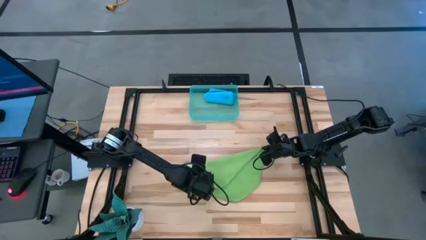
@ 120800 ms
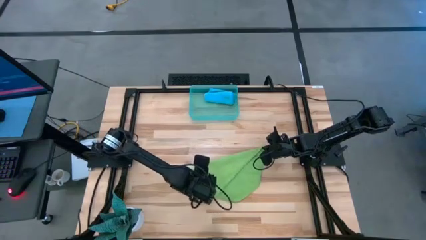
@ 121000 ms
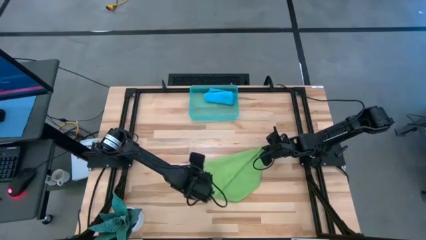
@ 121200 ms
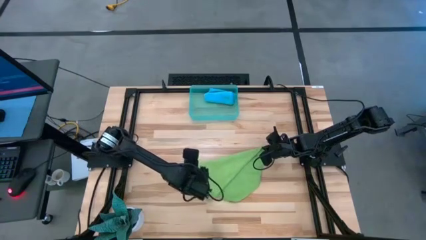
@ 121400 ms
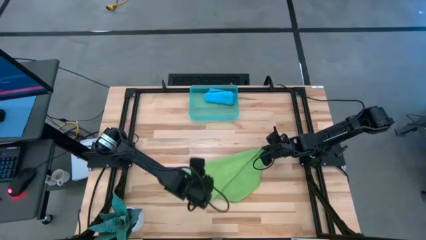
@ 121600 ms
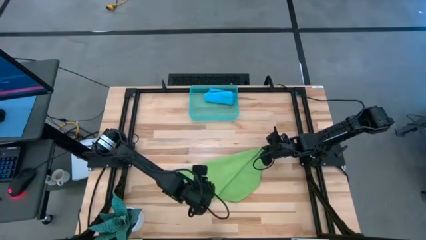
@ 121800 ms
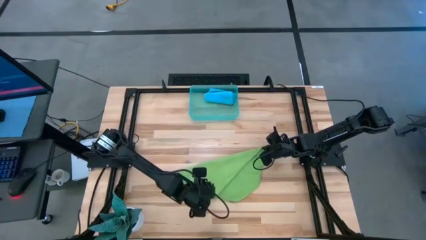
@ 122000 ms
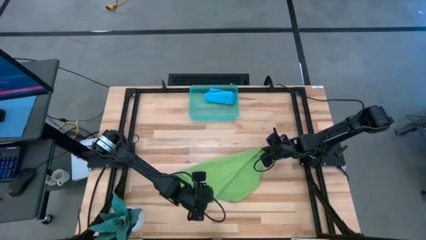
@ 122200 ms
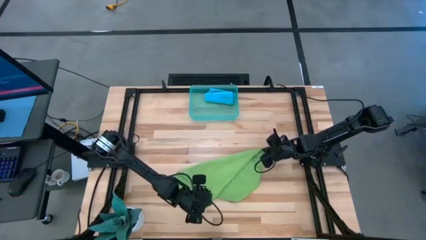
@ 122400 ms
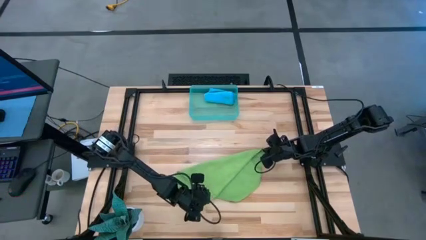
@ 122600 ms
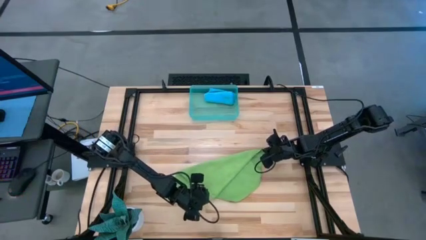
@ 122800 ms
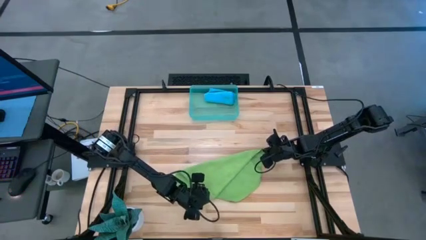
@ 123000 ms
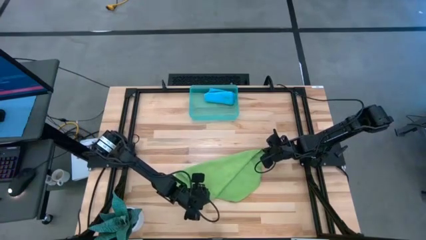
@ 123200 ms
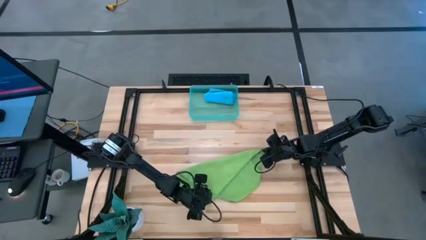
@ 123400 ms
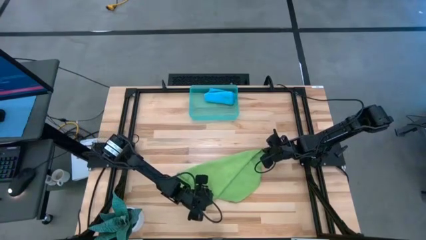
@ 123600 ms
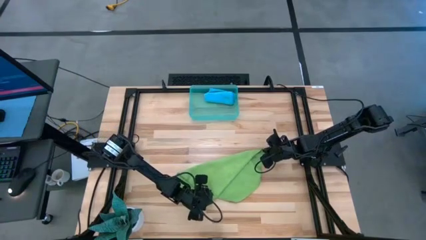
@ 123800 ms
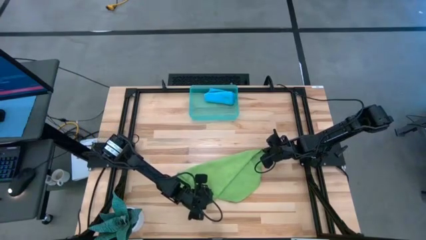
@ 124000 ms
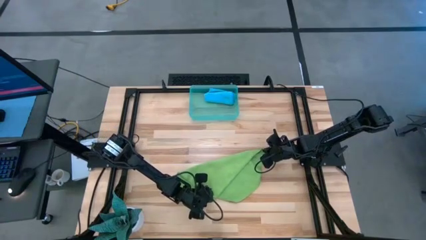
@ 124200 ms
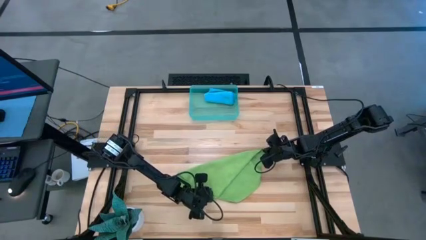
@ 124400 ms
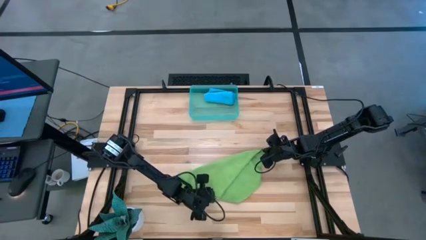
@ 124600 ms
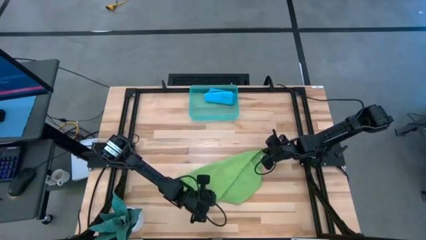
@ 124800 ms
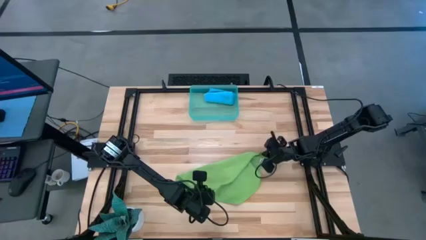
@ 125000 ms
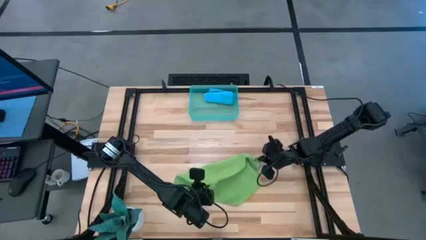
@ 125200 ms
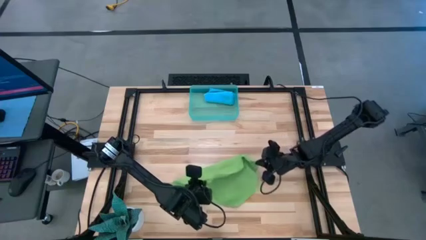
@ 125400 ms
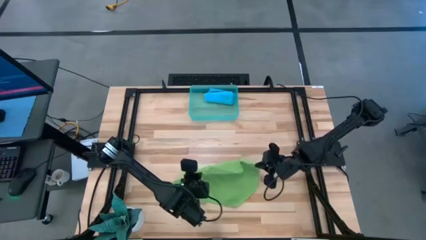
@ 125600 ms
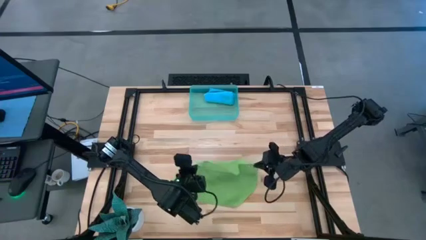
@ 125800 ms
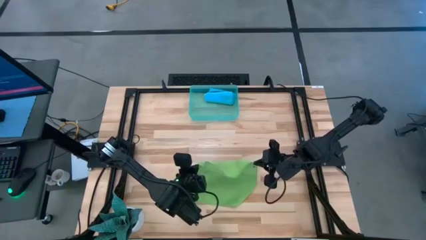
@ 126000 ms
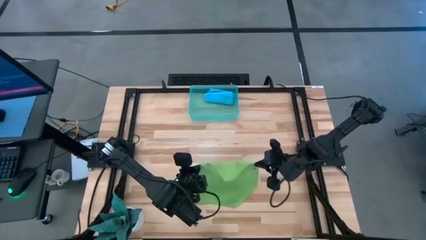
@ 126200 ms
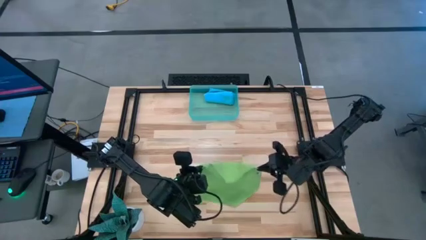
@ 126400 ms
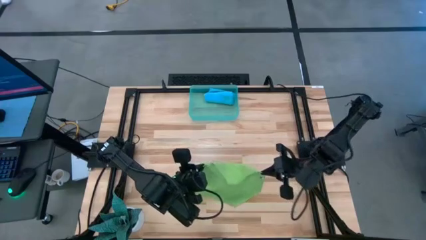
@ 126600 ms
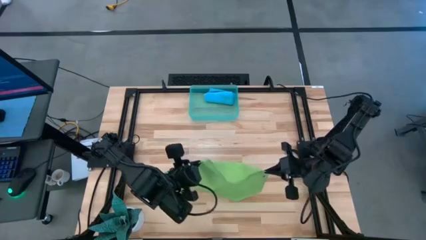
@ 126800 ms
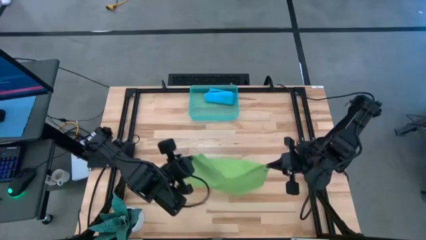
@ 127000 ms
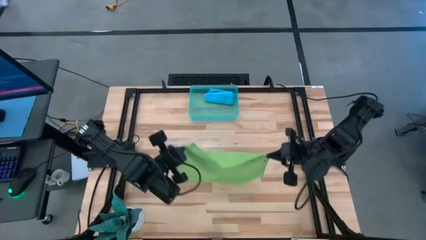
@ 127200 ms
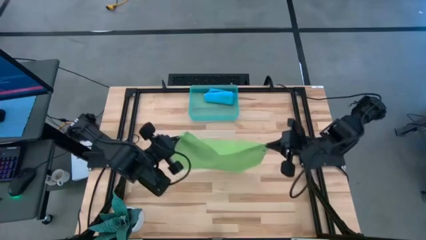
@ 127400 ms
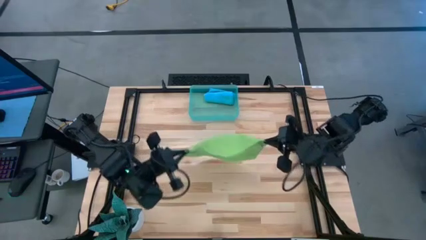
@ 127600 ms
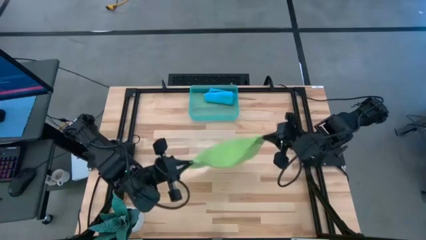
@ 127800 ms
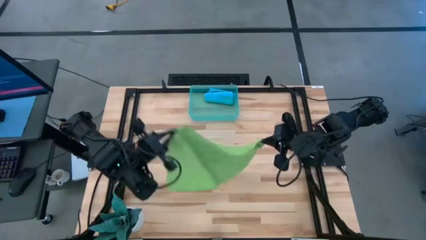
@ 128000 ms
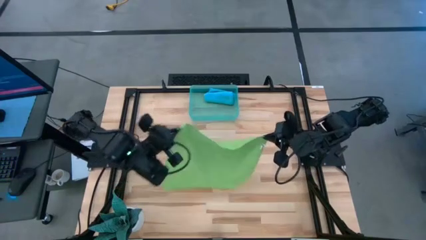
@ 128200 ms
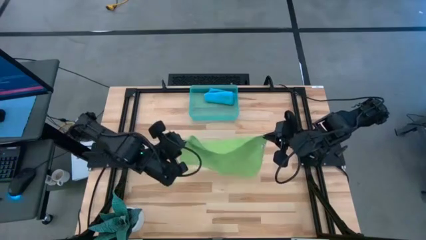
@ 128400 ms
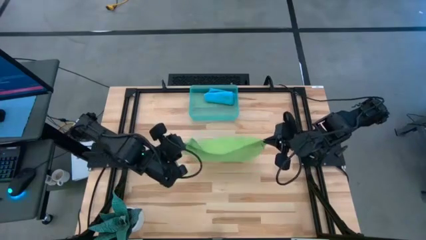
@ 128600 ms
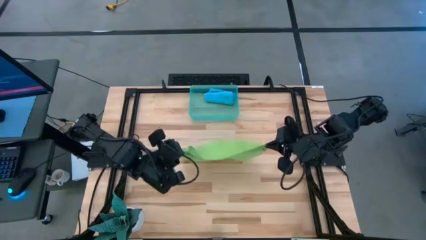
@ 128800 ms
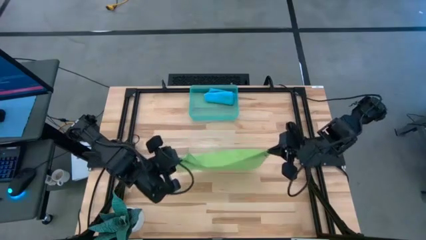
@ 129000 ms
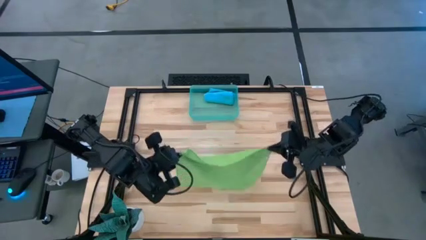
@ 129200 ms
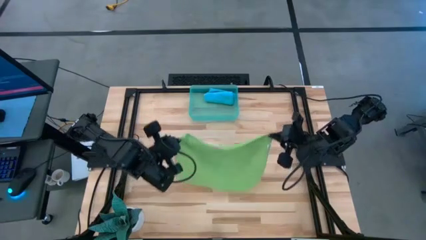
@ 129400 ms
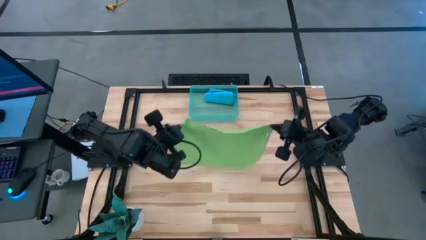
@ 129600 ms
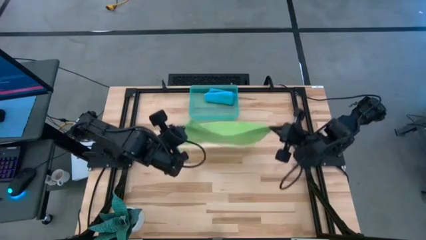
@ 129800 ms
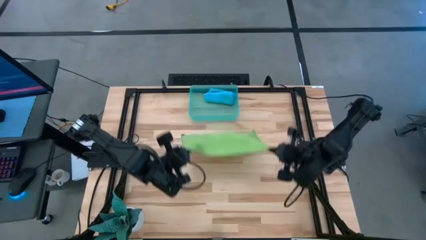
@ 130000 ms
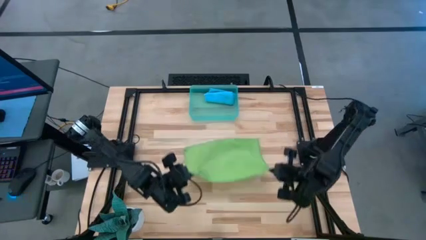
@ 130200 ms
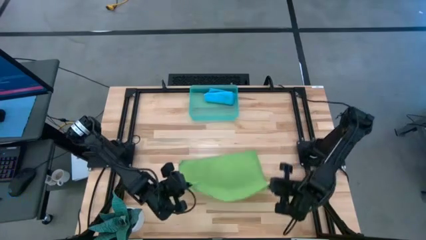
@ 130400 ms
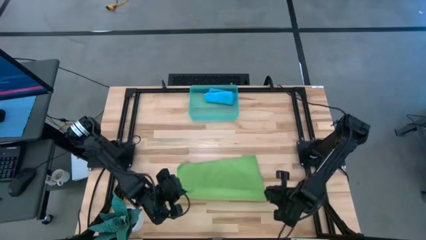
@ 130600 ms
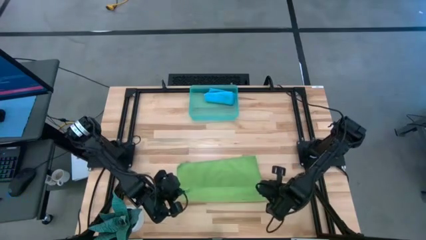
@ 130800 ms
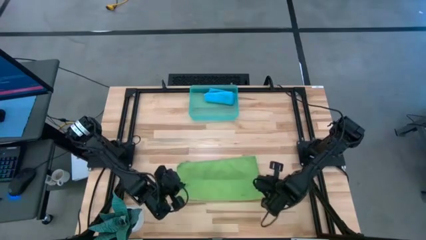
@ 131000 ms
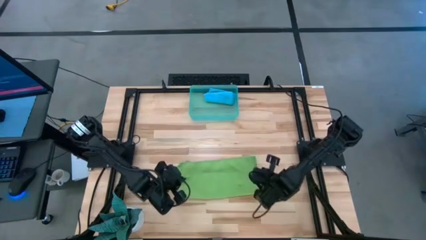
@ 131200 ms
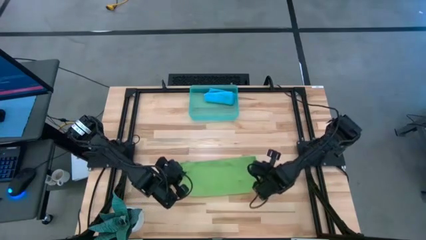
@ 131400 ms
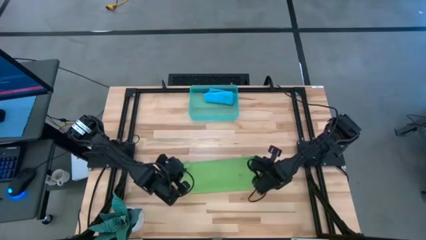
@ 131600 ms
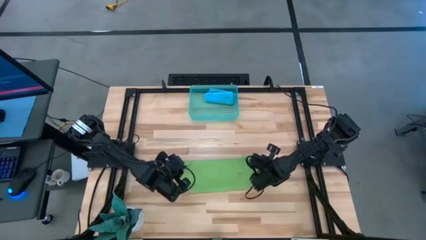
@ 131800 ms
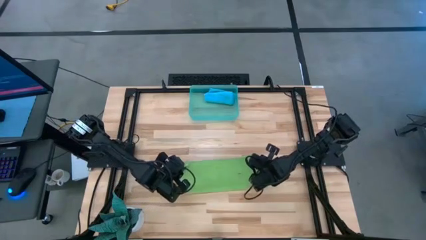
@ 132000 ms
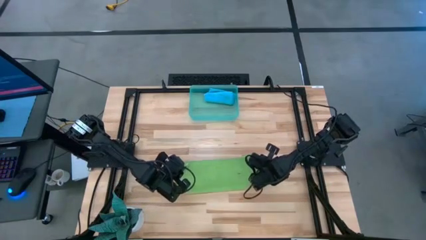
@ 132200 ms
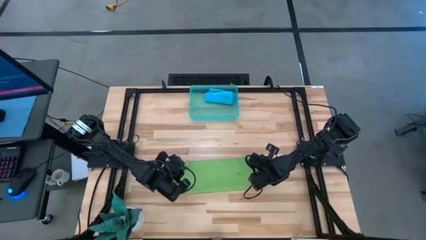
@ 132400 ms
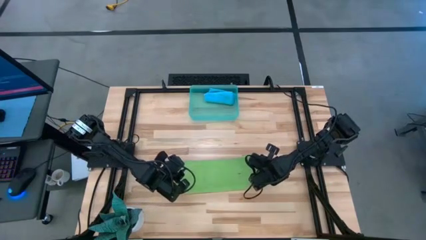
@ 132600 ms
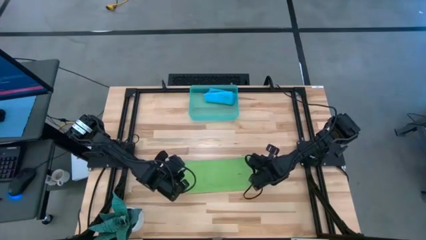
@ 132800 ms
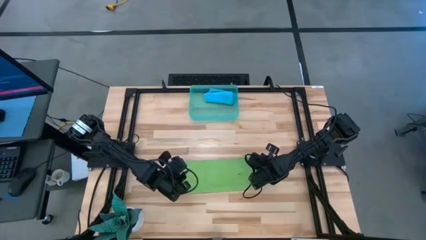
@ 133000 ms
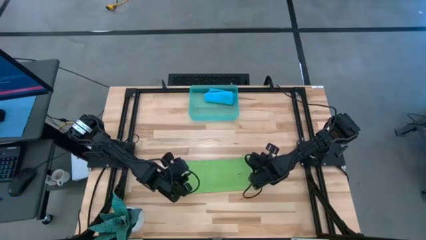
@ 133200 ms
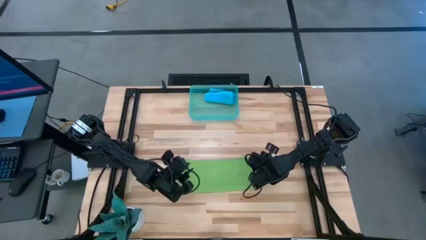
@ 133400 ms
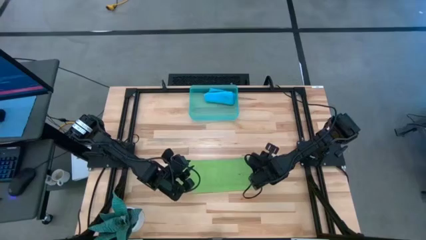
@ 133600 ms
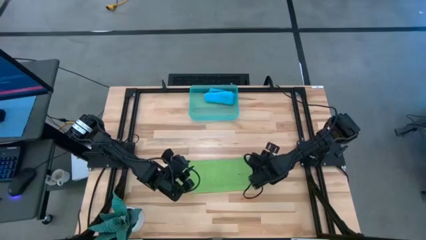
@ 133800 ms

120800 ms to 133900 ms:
Task: Roll microfiber towels into tight, uniform cylinder then place into a basket
Fold the green microfiber cloth

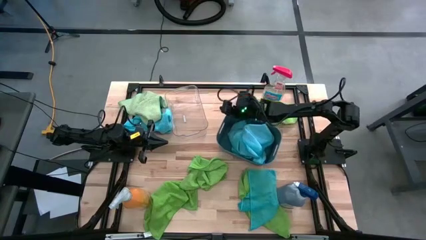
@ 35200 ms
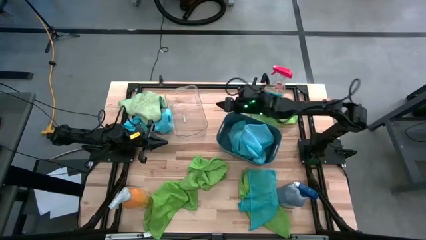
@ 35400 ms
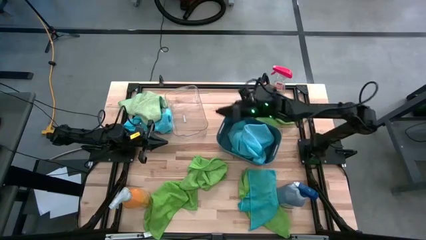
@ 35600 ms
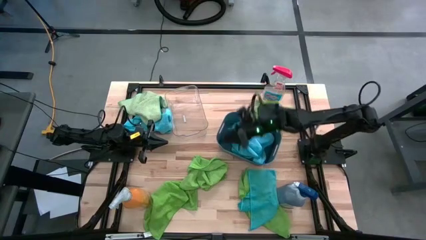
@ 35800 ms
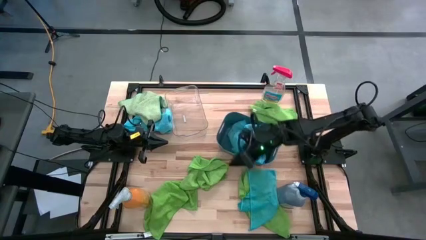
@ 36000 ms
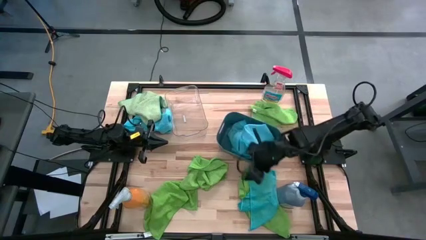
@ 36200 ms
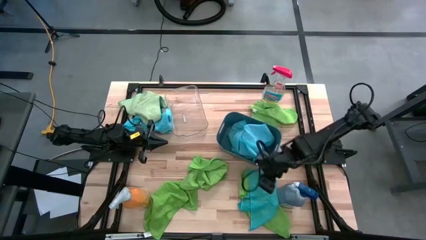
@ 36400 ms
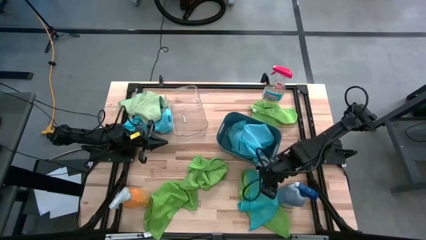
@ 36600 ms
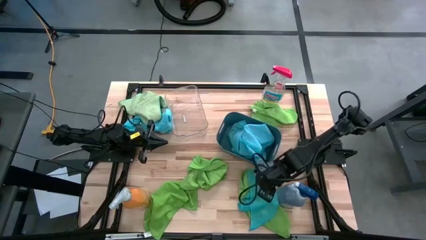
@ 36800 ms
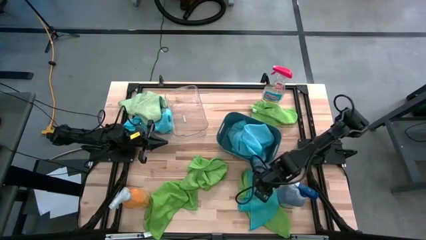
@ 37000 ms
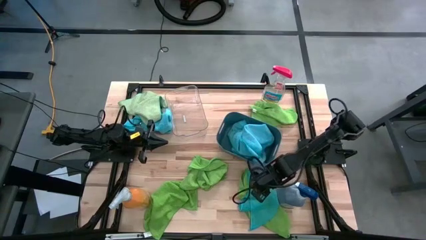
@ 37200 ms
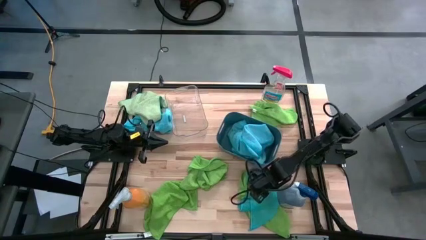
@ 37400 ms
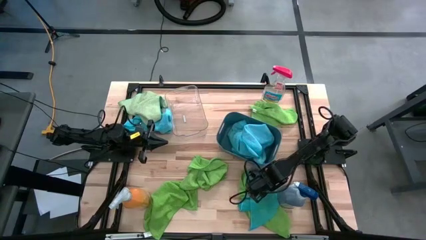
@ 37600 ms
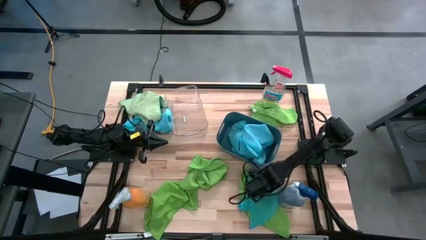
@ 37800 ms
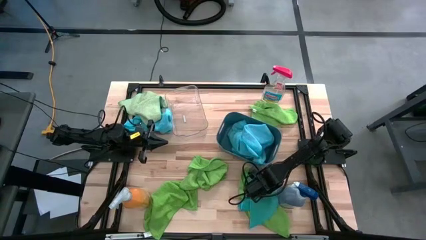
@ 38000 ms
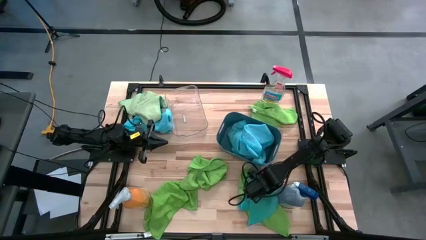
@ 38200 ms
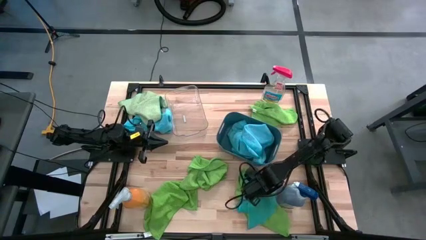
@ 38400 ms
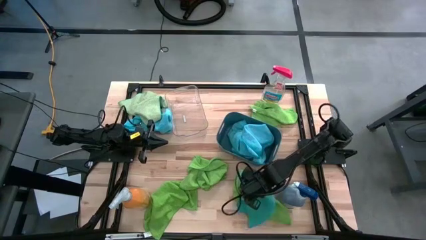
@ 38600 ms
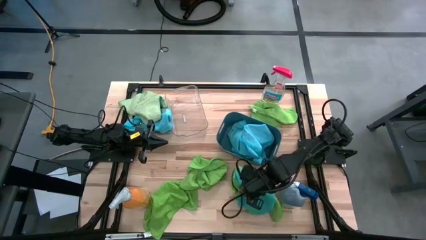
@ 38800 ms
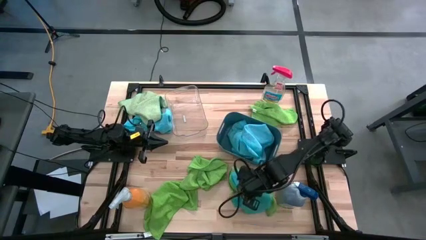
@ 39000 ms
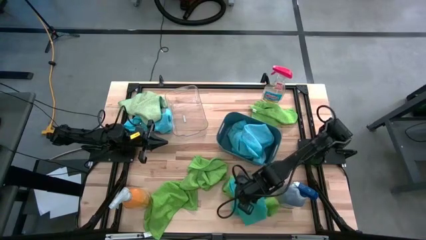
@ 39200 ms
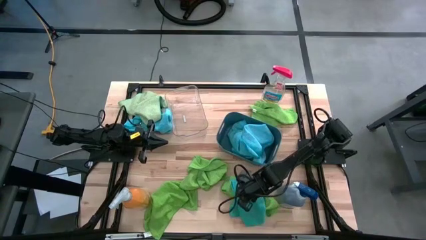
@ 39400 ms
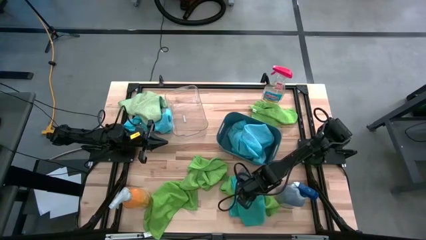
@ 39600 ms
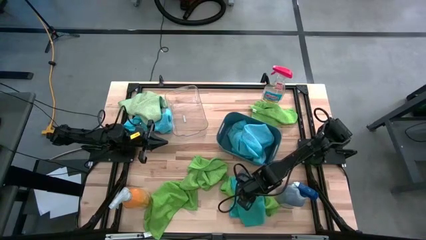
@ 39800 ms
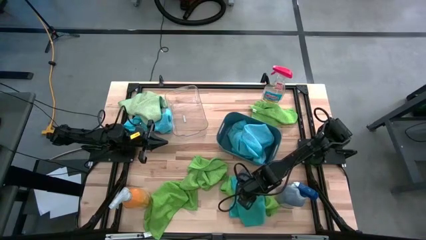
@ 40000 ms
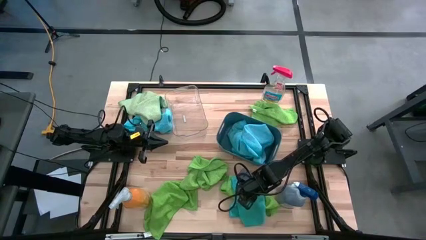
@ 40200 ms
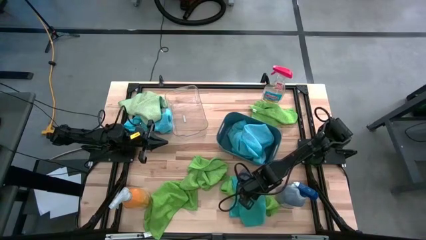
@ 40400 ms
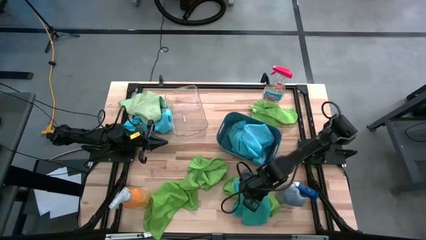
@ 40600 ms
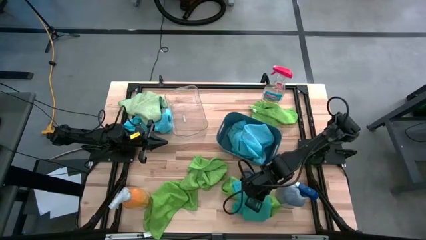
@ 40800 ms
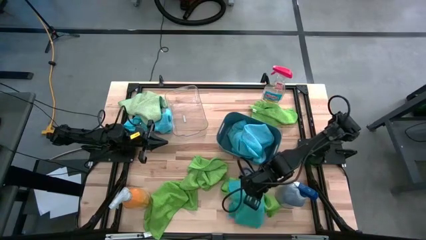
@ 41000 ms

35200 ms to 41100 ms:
Task: Sort microfiber towel by color & place in baskets
Put the blue towel into the blue bin
